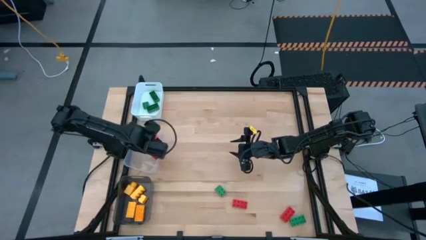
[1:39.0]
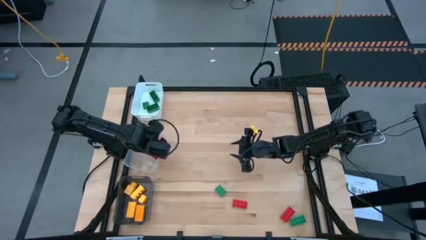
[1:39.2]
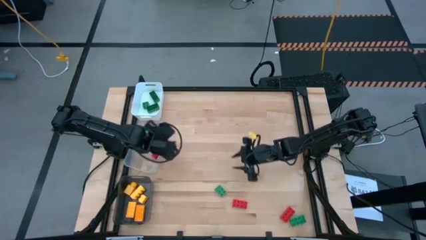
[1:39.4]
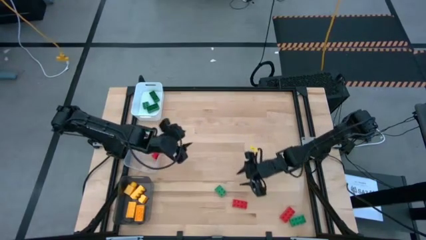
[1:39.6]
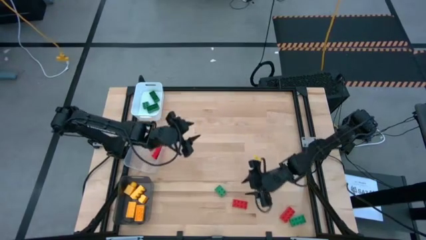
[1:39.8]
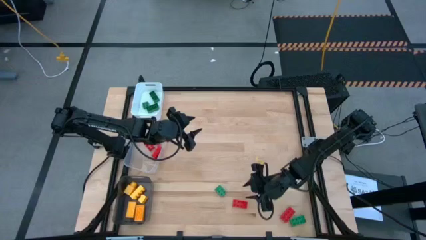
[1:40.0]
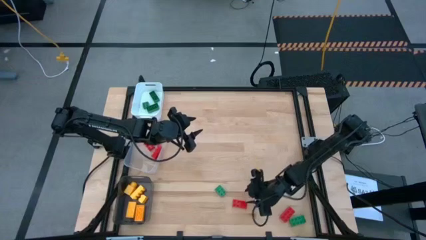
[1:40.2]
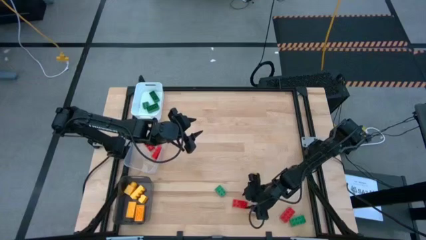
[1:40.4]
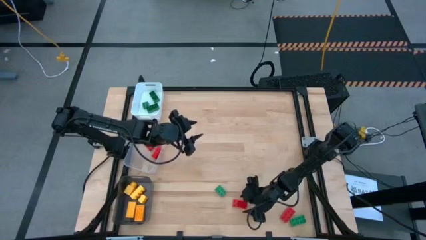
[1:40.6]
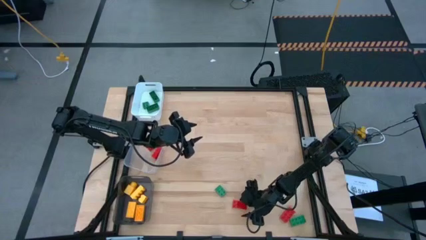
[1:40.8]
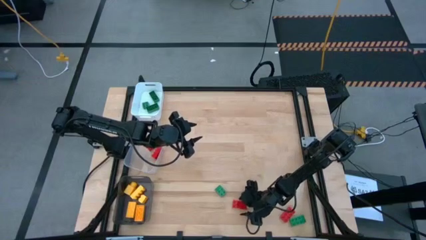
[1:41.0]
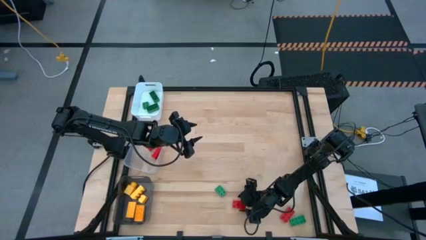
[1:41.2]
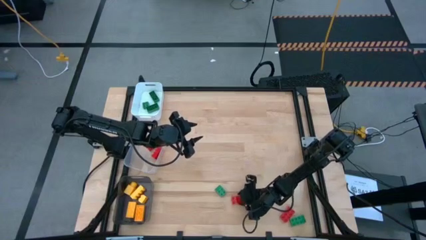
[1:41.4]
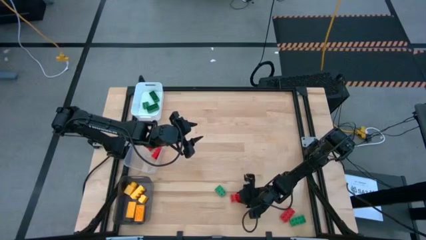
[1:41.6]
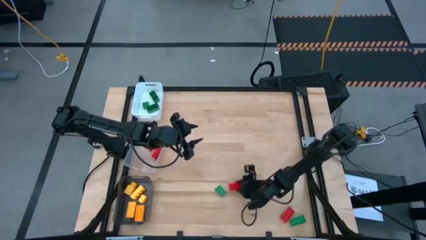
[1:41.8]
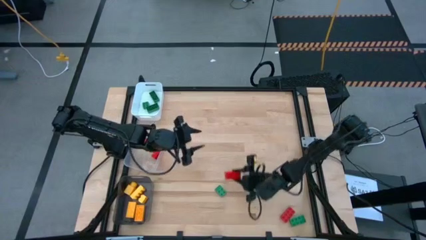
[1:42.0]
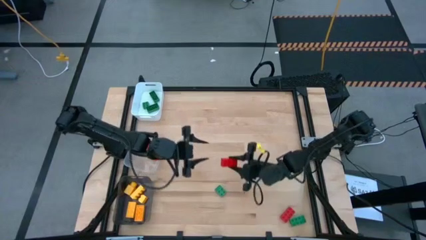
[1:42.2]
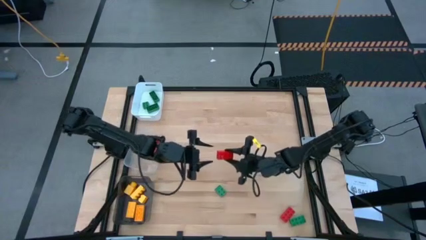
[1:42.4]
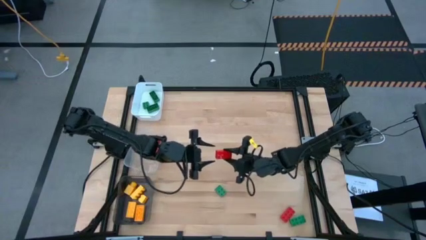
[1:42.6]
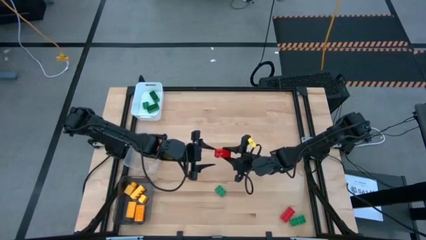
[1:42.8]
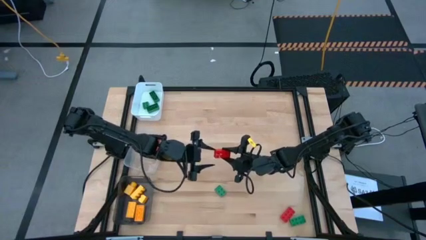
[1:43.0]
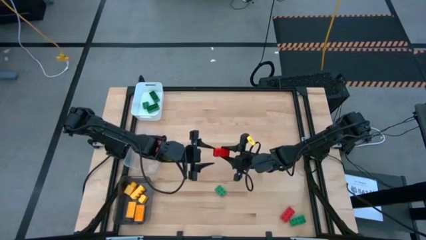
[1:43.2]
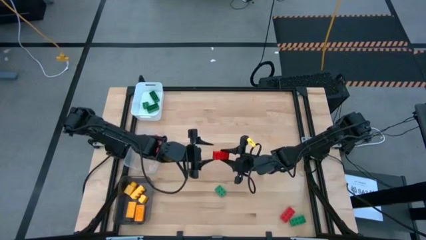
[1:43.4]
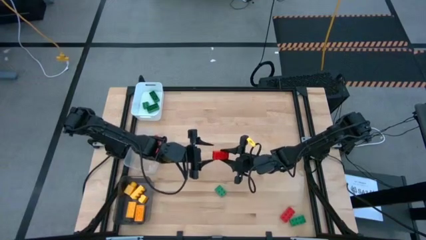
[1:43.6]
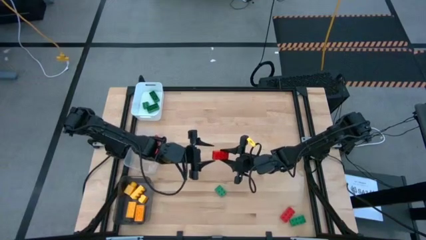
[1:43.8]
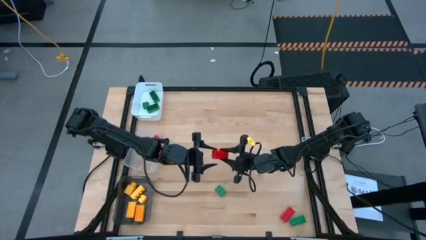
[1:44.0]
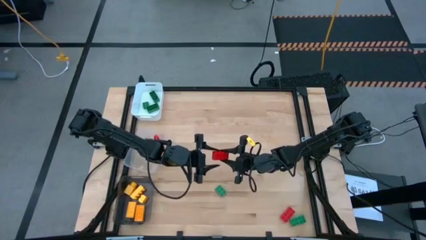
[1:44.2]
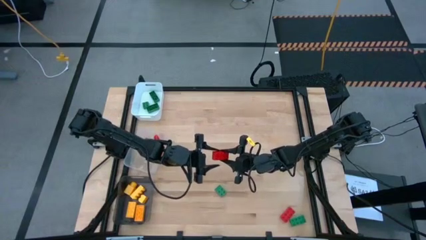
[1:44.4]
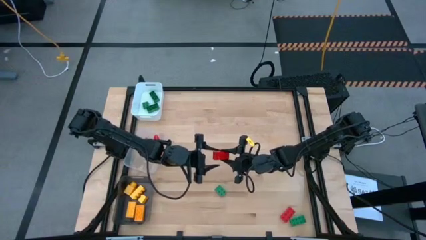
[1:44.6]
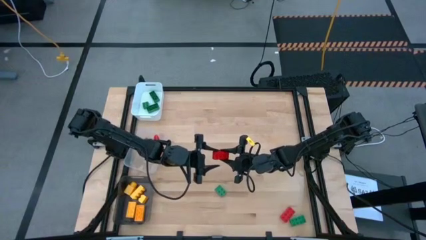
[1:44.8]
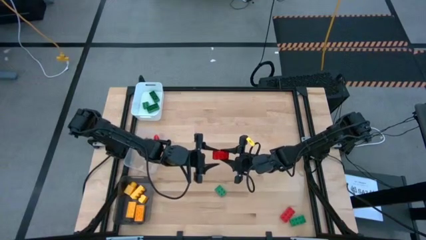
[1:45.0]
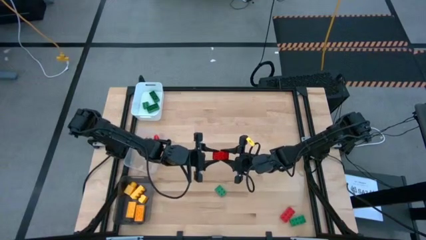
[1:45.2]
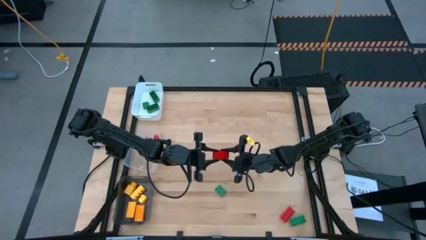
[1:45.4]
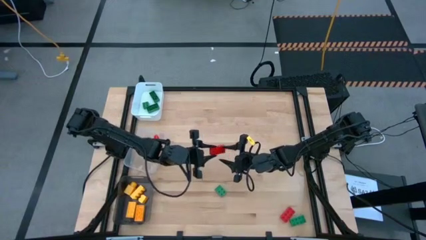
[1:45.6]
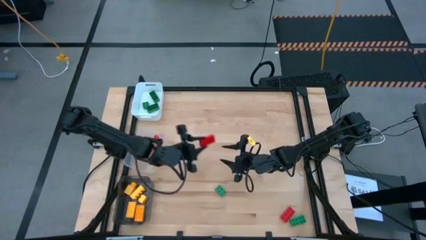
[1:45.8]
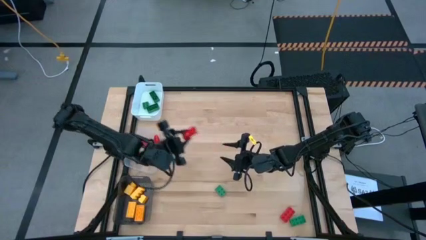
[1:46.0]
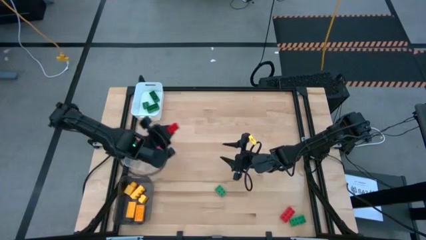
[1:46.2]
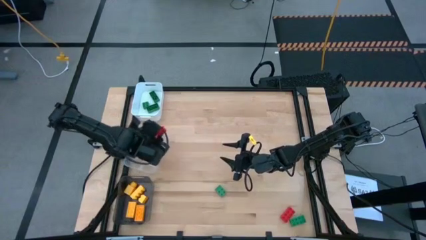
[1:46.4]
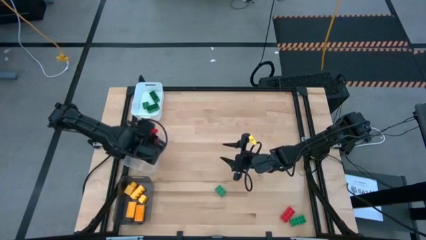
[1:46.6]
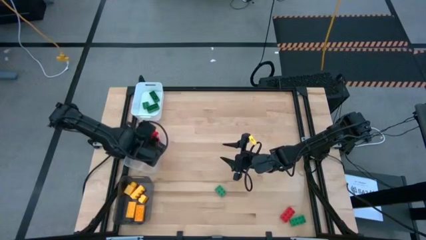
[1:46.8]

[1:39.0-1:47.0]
Task: Sort & place blocks by color
Put the left red game piece into the transparent bin

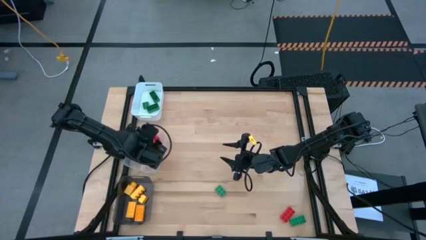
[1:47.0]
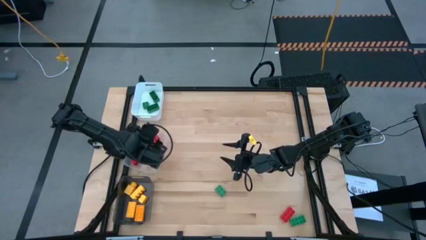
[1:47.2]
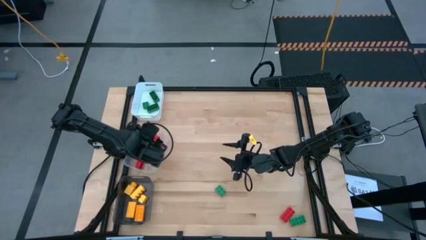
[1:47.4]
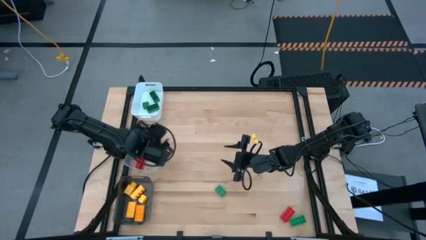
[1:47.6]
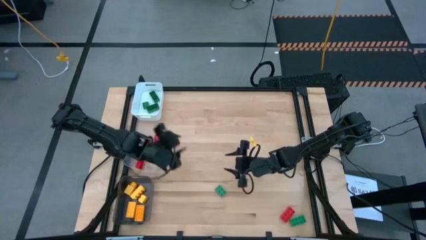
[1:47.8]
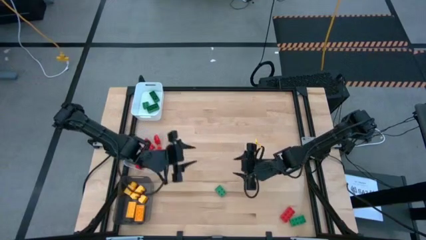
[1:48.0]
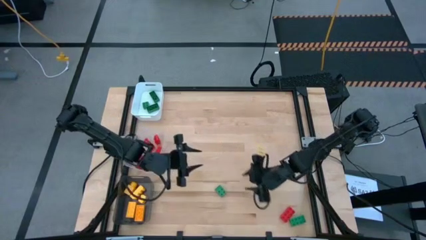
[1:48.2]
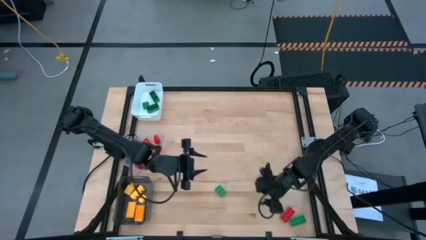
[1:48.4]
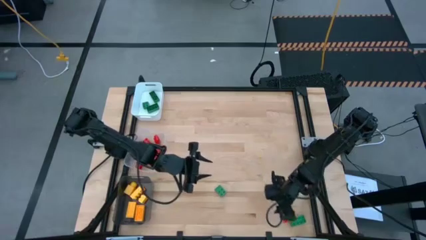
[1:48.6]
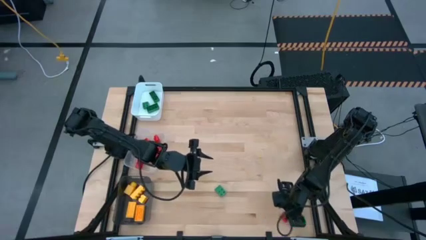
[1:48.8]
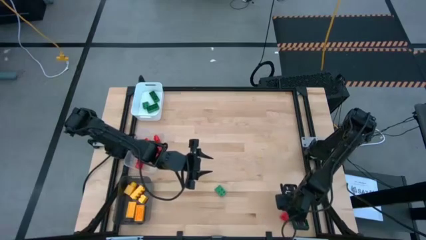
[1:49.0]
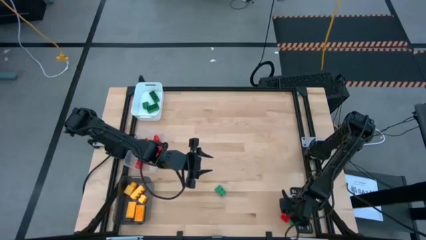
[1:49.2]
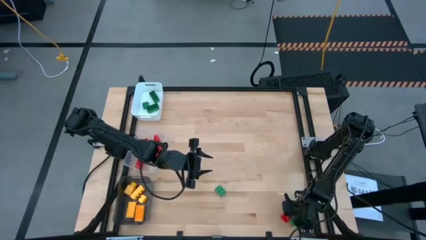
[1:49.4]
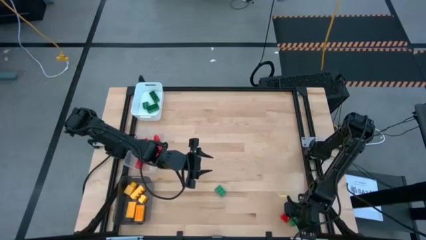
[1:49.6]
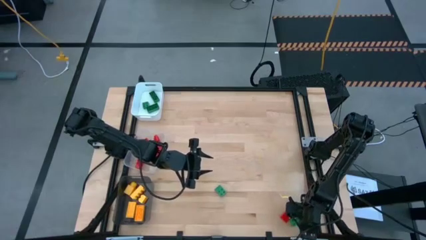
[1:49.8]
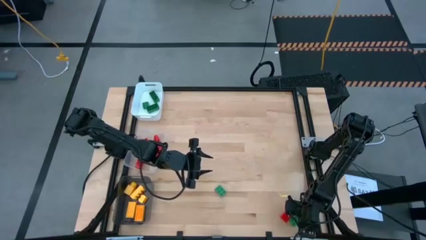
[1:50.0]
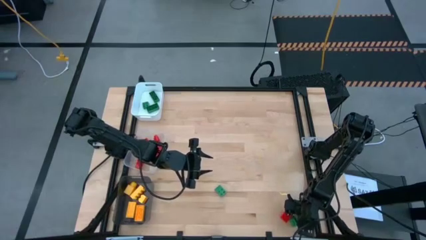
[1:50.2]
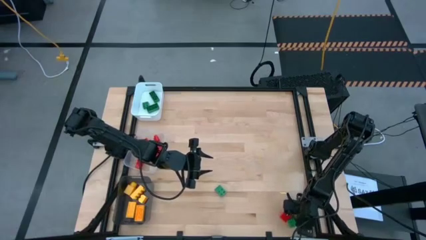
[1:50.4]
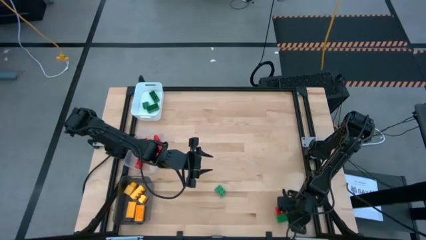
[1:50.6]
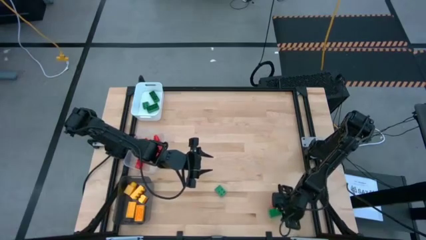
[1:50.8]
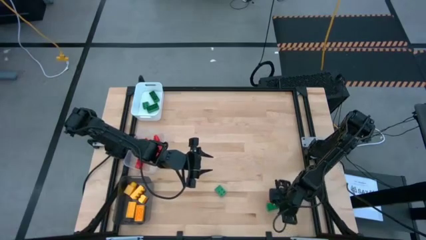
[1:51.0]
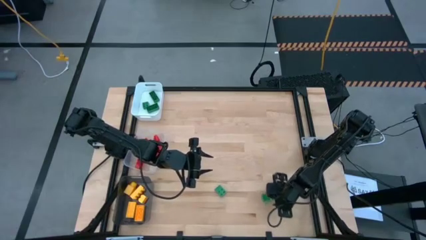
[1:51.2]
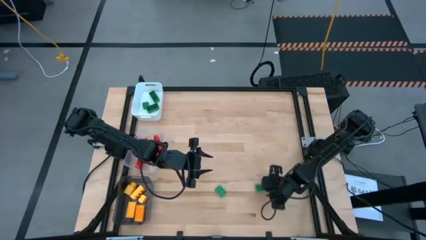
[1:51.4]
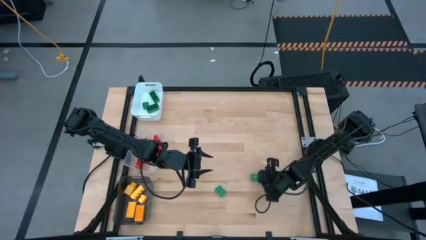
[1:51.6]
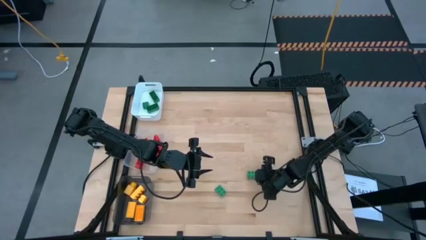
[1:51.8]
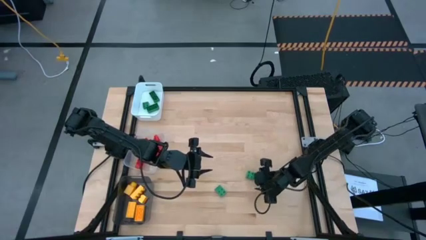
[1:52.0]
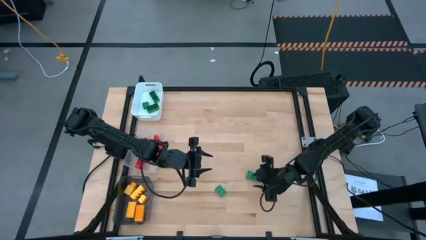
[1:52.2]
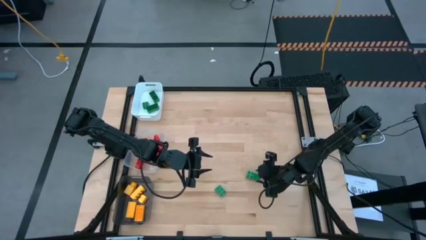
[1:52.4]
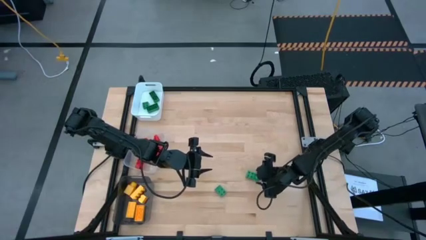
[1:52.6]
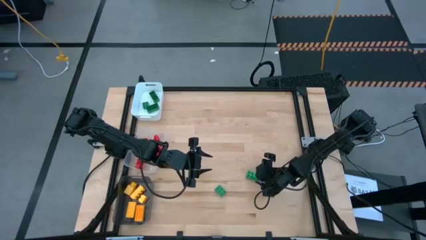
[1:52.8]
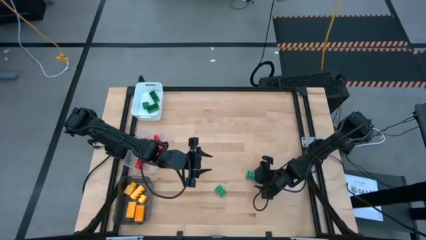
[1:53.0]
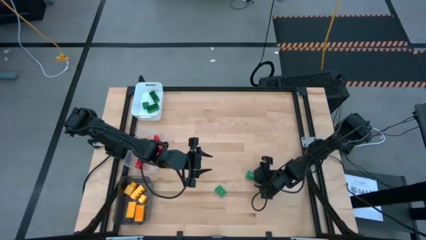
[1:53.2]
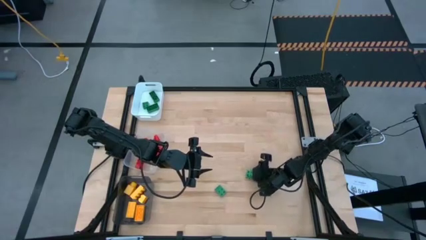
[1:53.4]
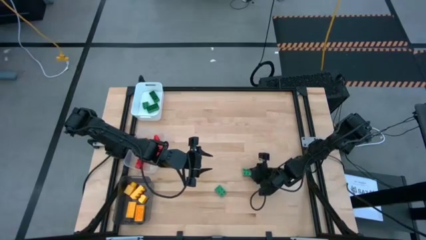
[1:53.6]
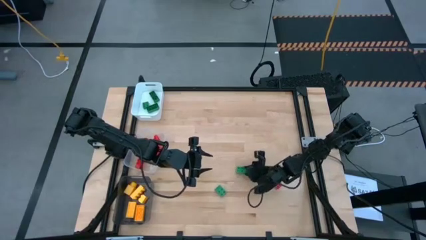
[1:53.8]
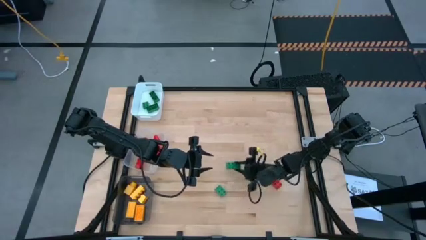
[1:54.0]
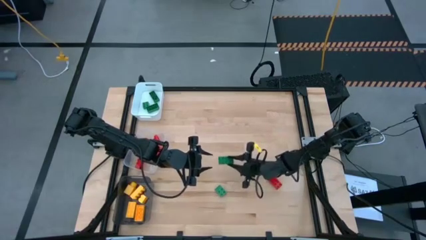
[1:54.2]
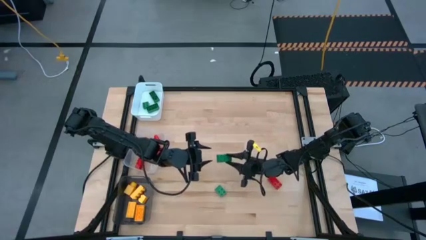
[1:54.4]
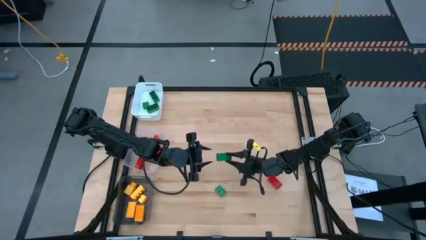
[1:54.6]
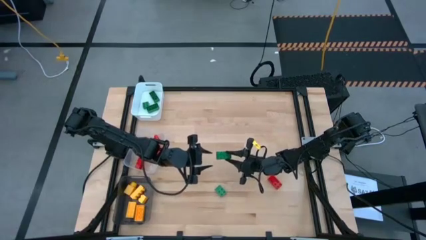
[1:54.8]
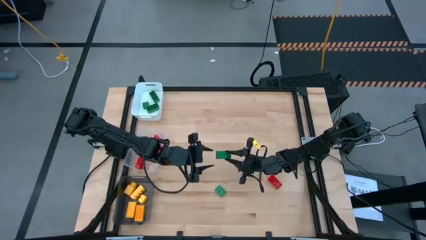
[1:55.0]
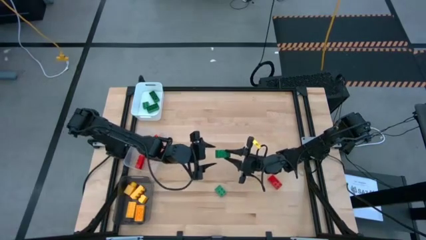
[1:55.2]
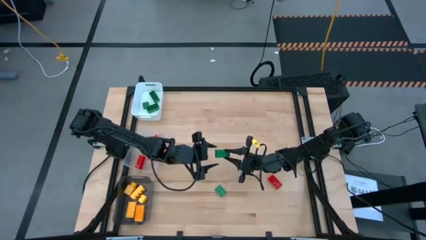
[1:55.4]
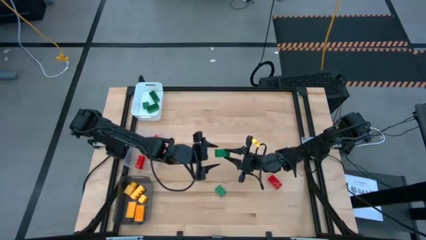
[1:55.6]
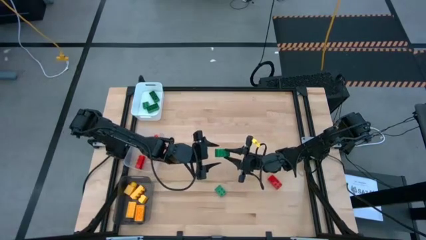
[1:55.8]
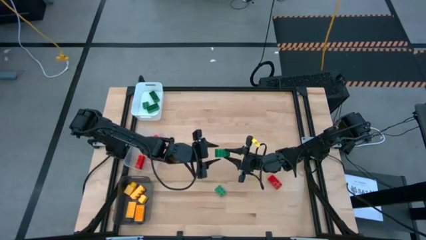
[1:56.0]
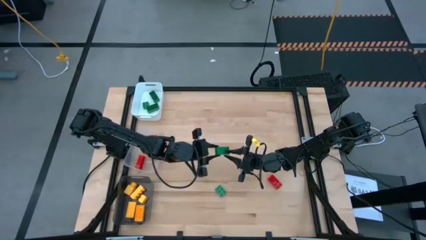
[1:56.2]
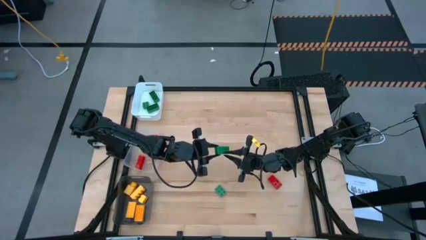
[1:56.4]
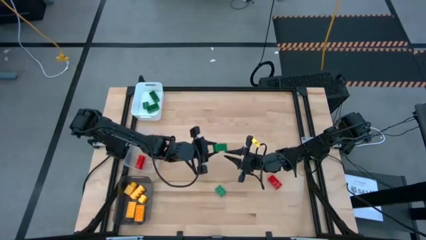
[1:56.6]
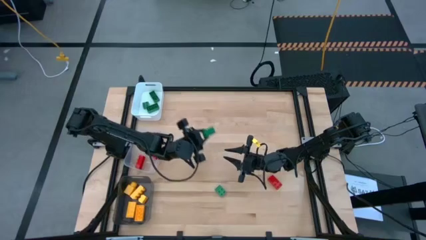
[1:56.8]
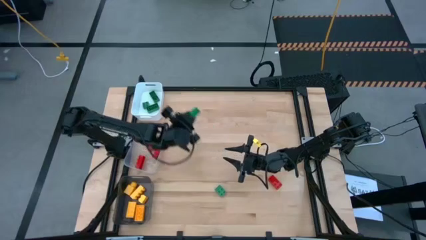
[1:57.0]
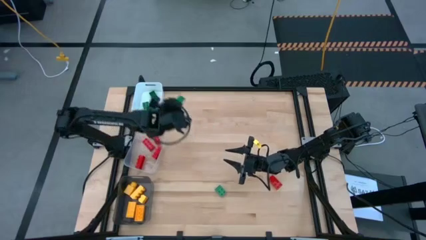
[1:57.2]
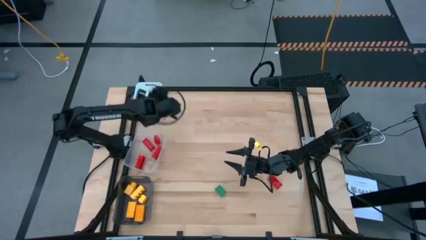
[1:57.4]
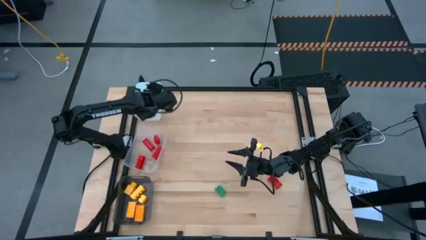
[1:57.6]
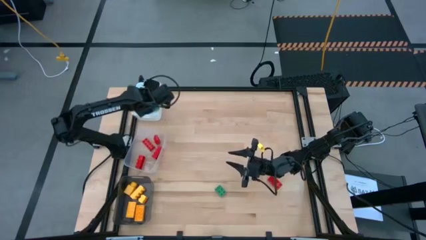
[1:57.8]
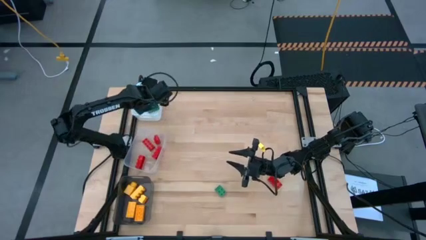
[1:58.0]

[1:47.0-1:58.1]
Put the bottom green game piece into the white bin
